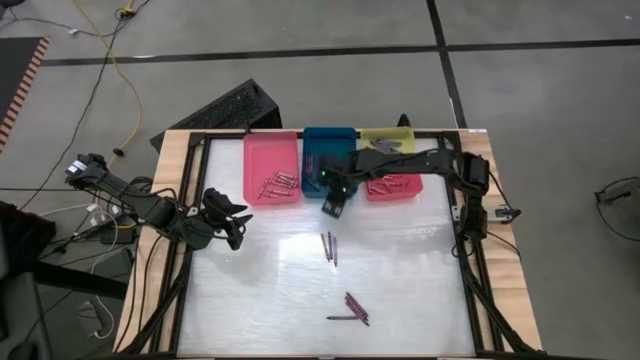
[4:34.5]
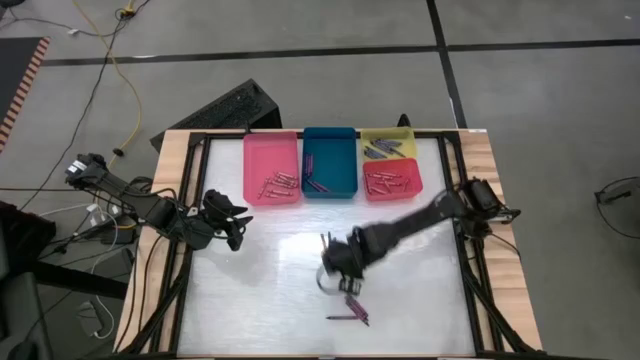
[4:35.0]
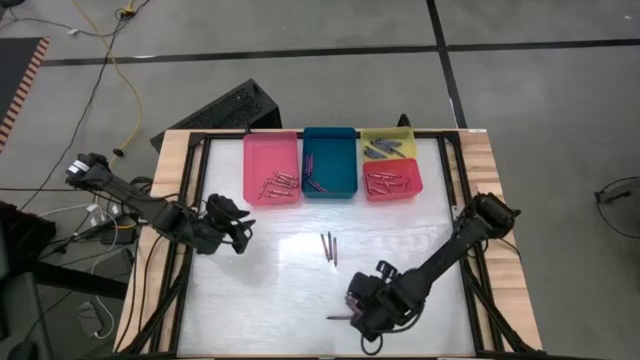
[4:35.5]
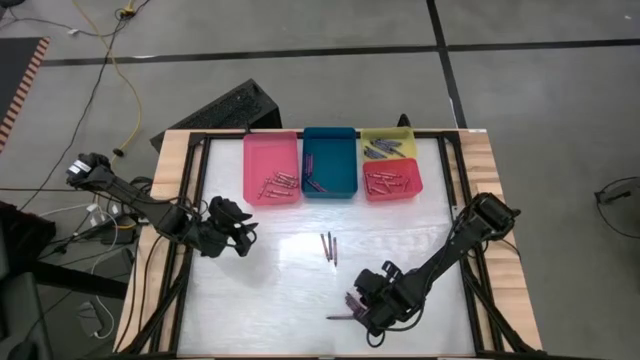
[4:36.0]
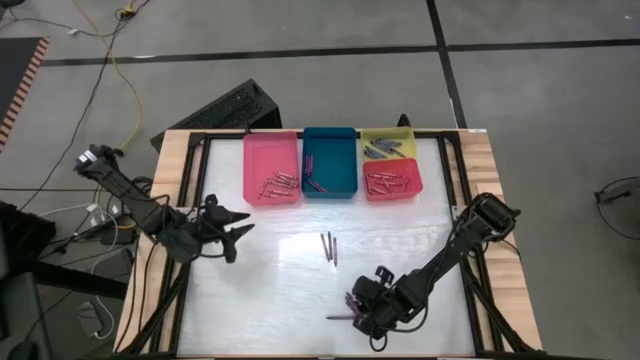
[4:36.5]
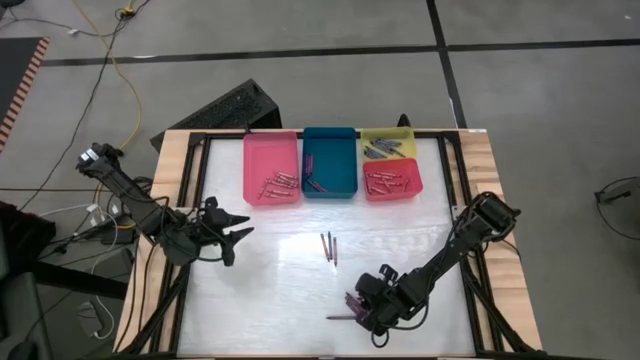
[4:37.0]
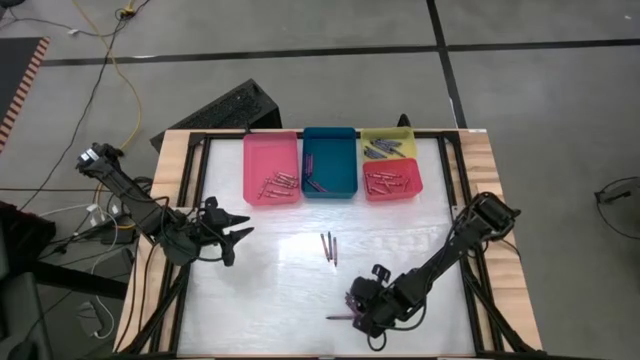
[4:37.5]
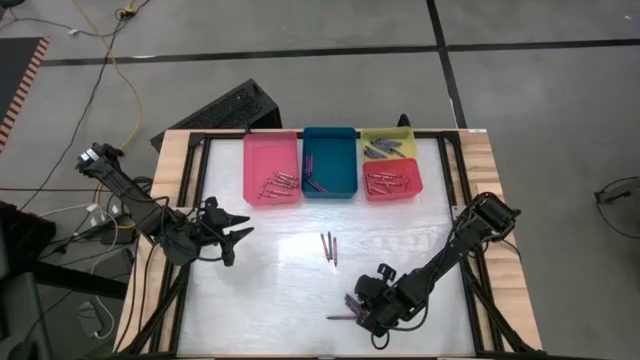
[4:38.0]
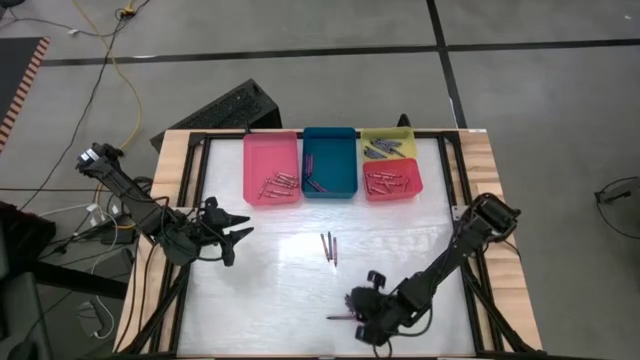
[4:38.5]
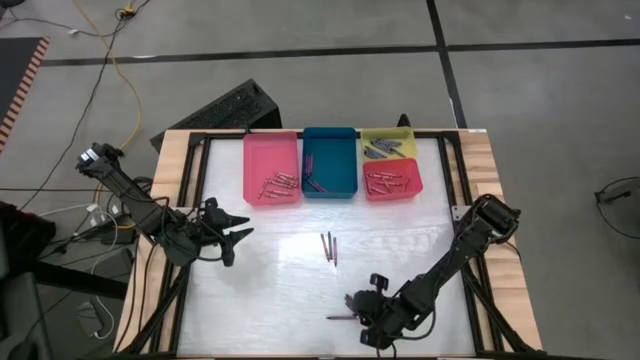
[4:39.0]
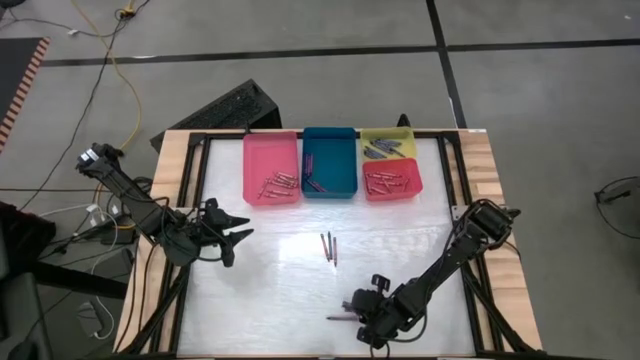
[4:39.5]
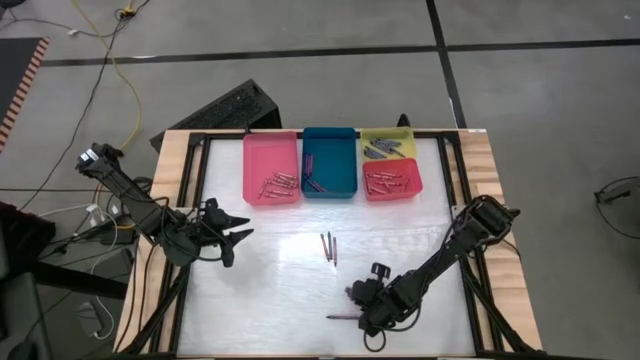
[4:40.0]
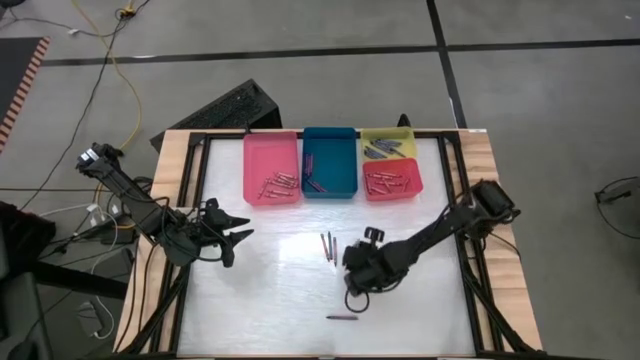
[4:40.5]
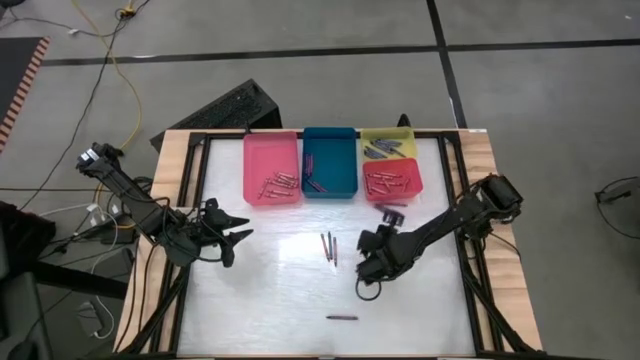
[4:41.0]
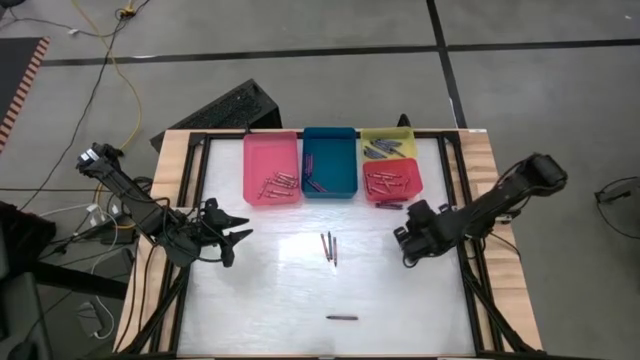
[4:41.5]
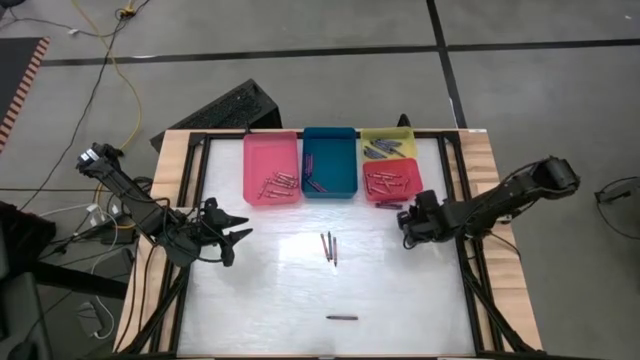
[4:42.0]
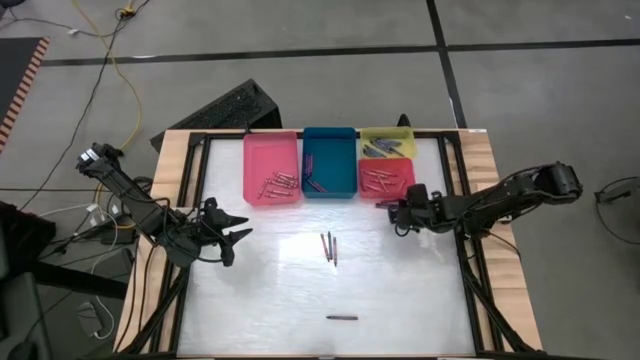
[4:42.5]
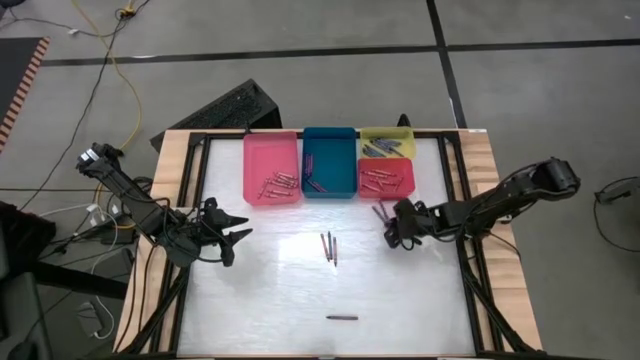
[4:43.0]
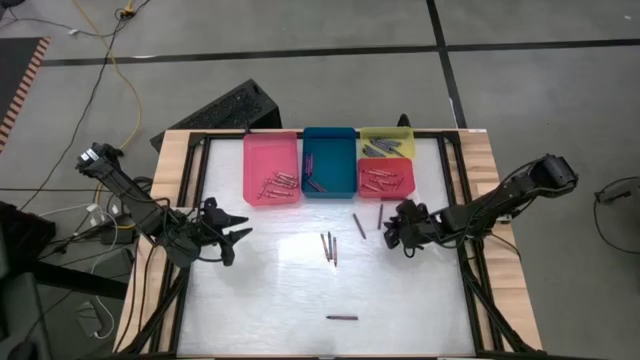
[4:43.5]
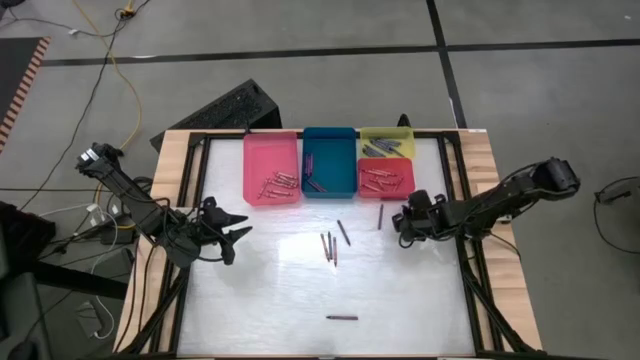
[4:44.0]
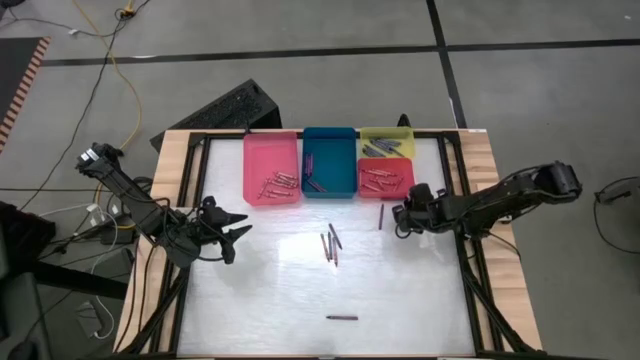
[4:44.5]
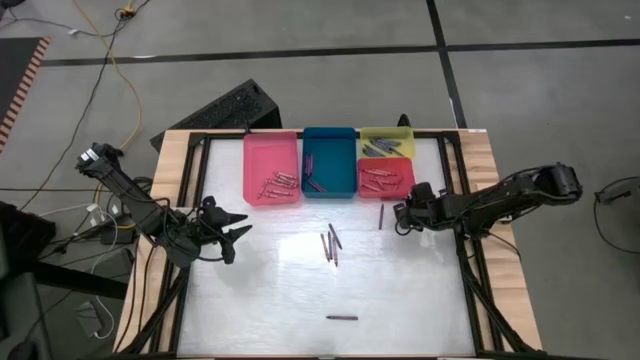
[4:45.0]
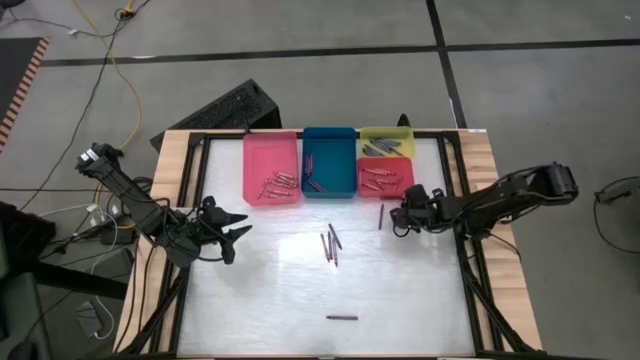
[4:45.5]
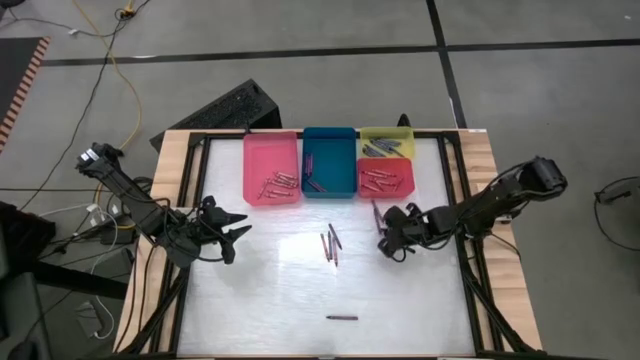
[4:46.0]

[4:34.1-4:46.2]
Task: Sort crayons
Put the violet crayon into the blue bin

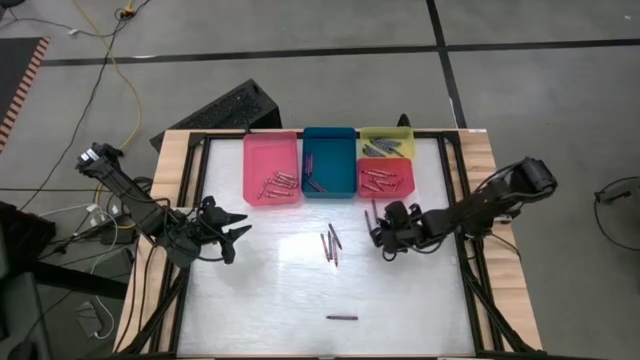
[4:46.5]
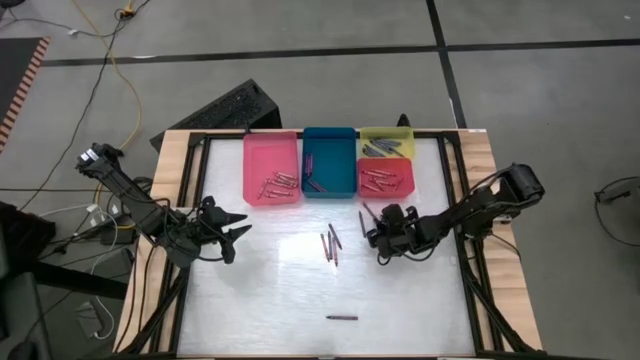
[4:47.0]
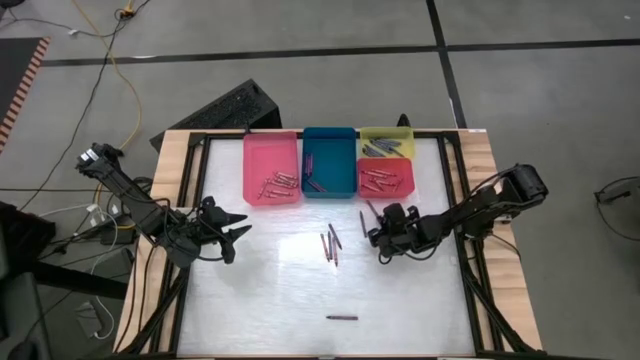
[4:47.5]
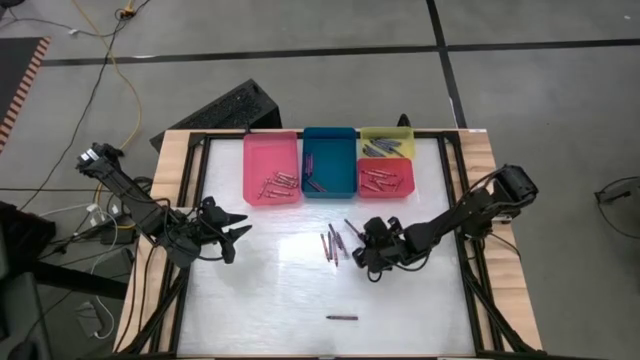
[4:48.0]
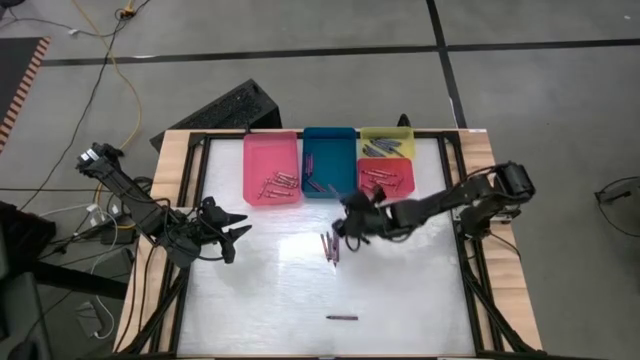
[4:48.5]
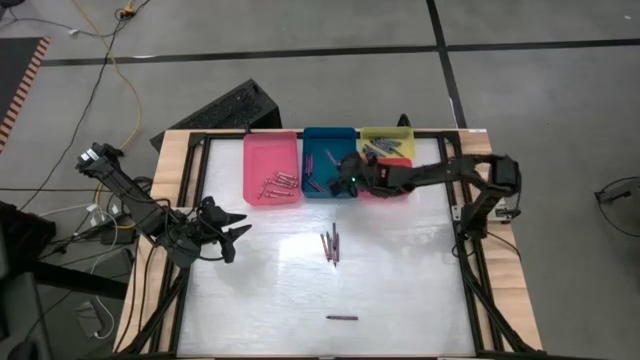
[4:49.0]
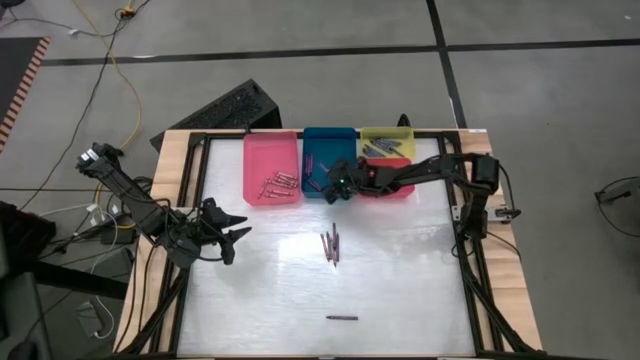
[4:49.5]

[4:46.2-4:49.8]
Put the violet crayon into the blue bin

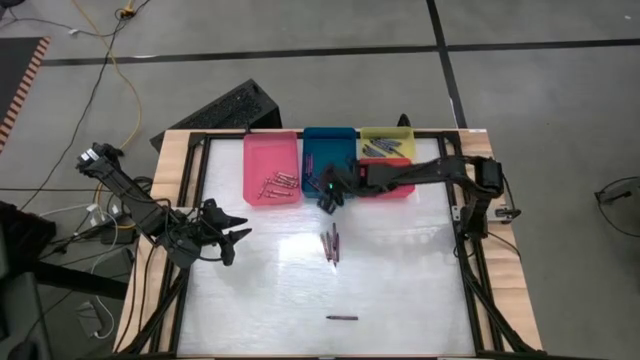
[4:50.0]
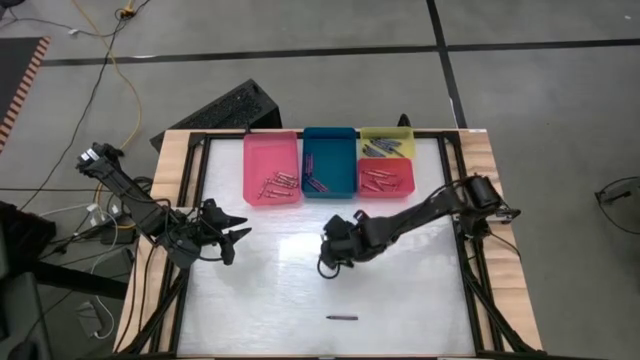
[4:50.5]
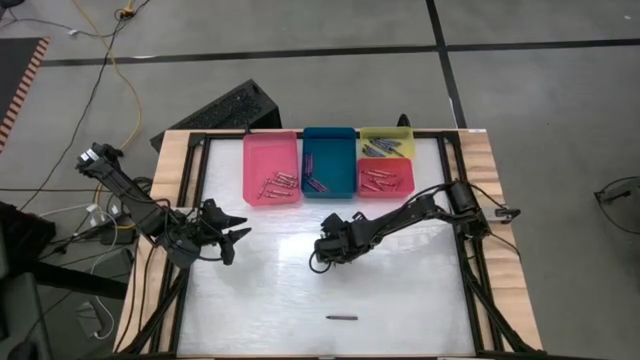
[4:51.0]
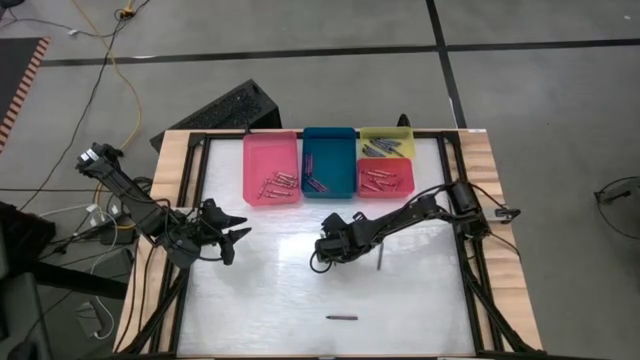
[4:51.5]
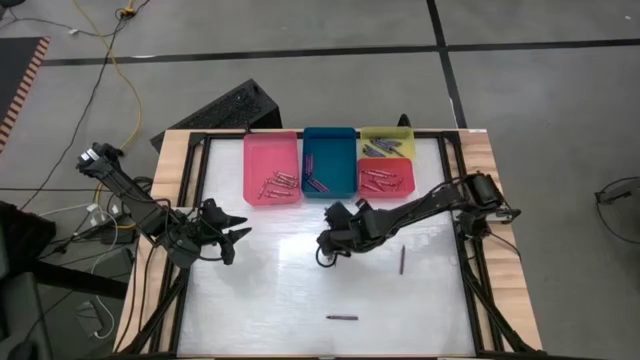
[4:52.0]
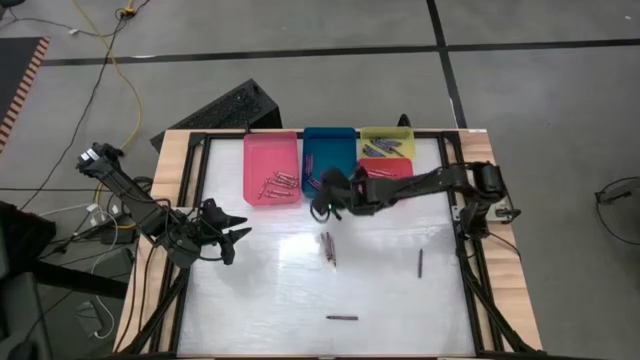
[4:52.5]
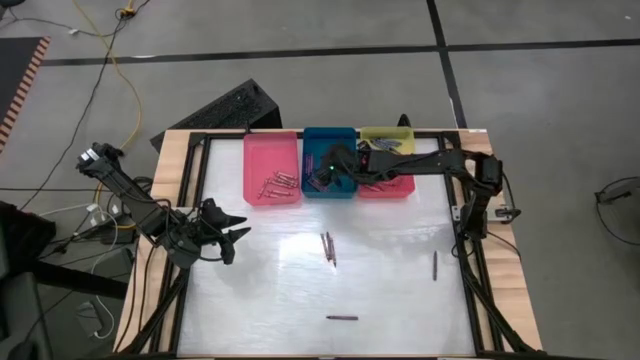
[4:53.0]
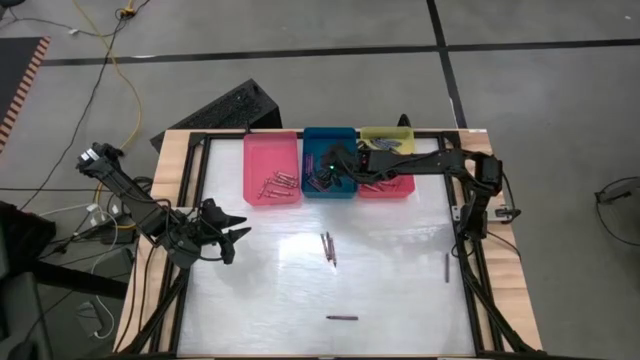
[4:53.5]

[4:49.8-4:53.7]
Put the violet crayon into the blue bin
